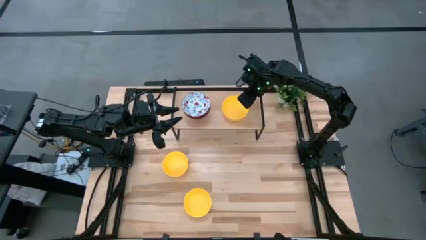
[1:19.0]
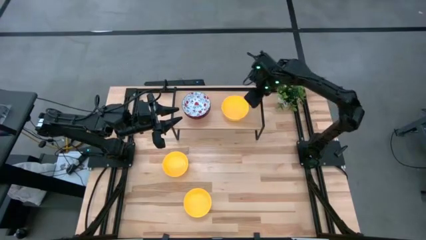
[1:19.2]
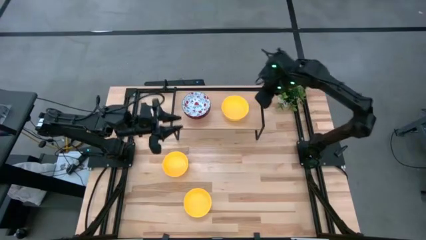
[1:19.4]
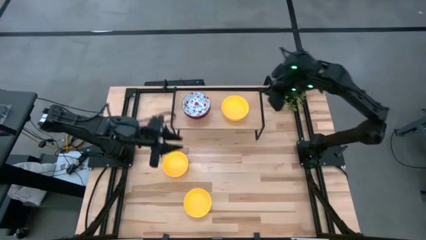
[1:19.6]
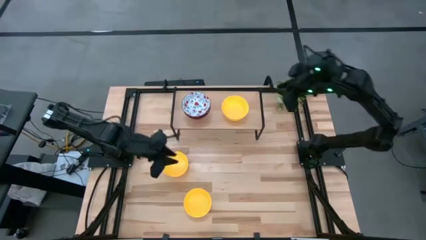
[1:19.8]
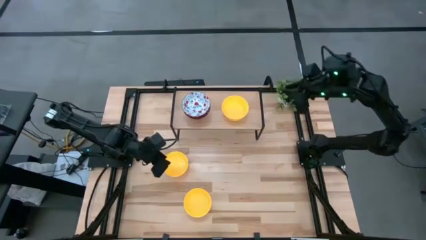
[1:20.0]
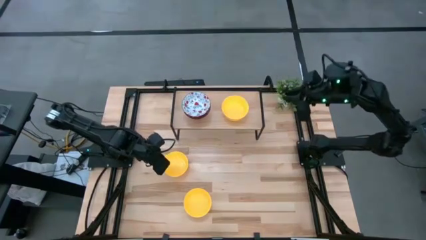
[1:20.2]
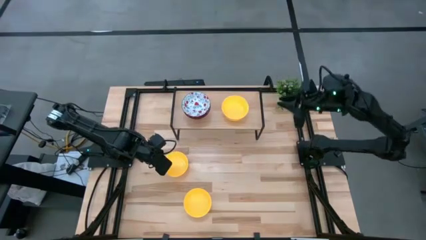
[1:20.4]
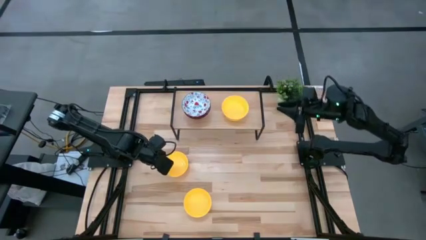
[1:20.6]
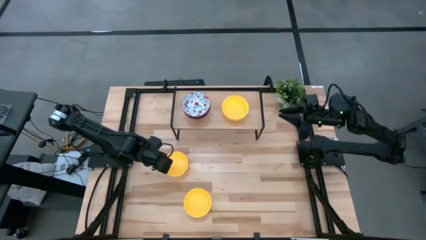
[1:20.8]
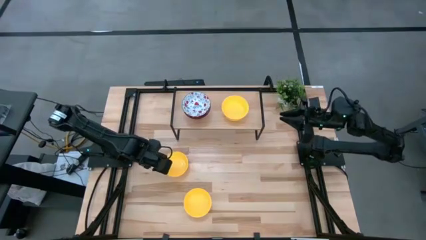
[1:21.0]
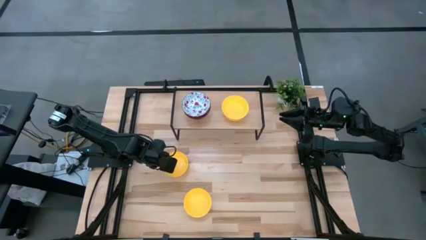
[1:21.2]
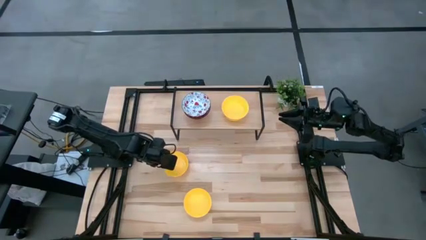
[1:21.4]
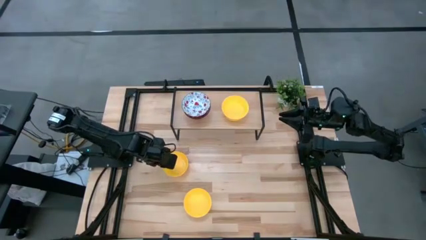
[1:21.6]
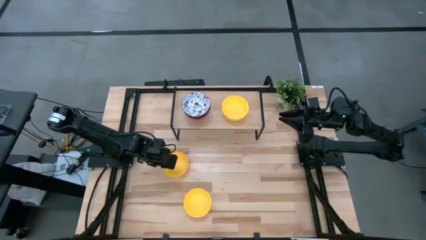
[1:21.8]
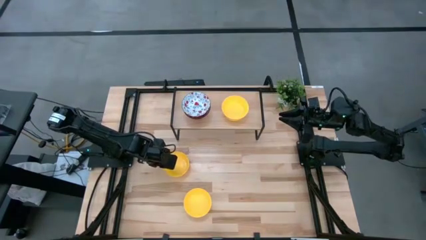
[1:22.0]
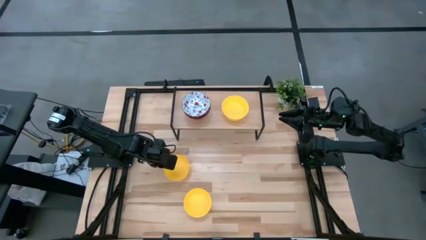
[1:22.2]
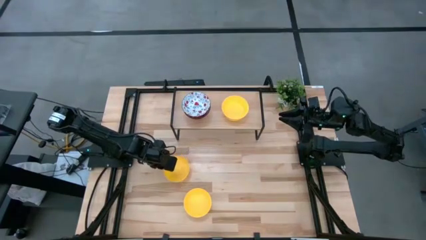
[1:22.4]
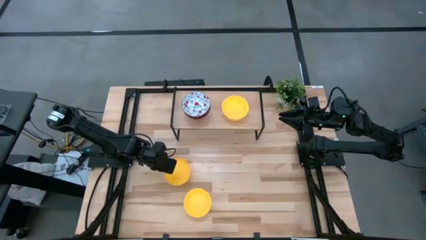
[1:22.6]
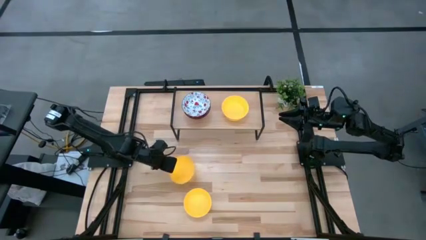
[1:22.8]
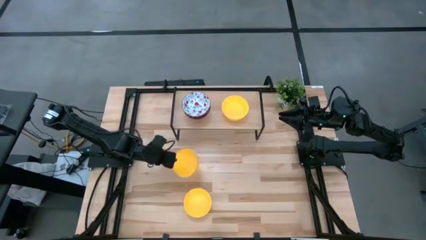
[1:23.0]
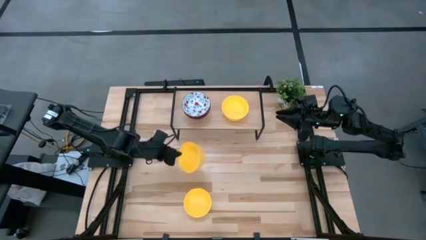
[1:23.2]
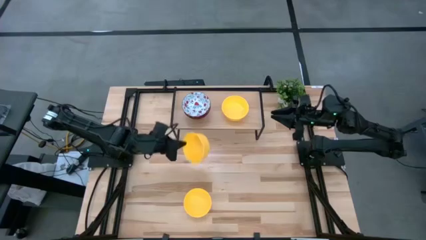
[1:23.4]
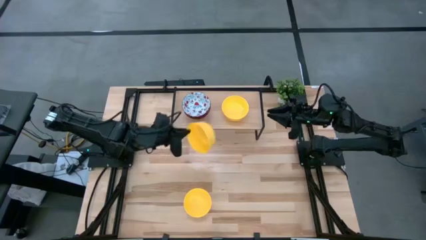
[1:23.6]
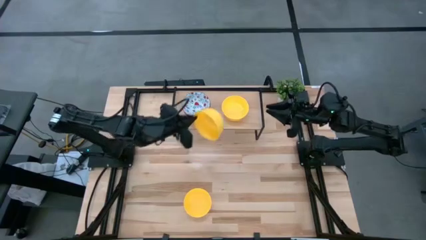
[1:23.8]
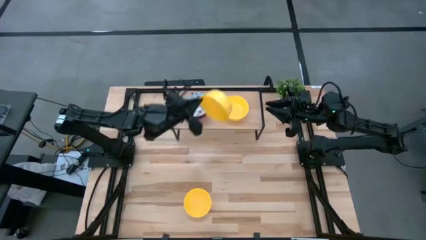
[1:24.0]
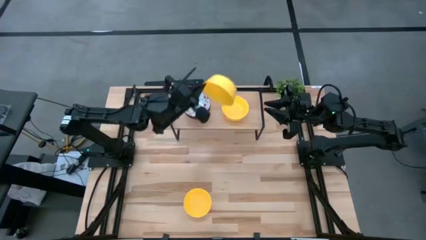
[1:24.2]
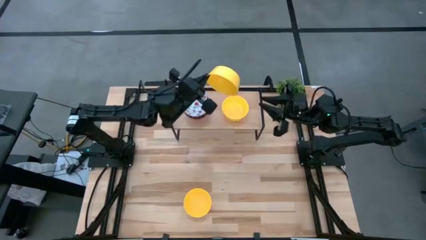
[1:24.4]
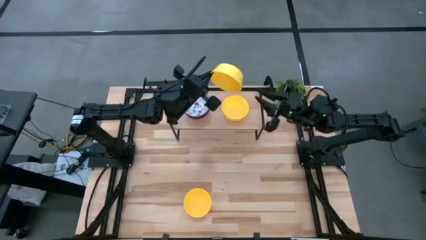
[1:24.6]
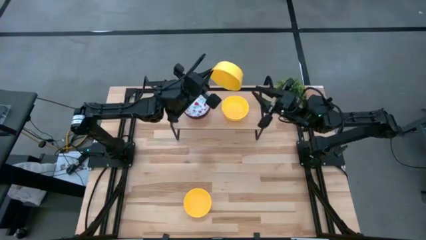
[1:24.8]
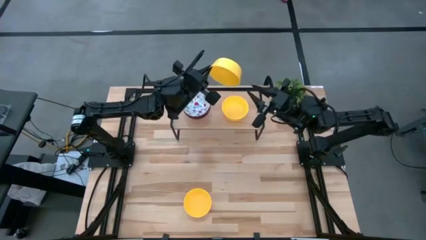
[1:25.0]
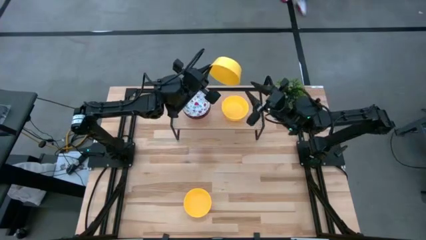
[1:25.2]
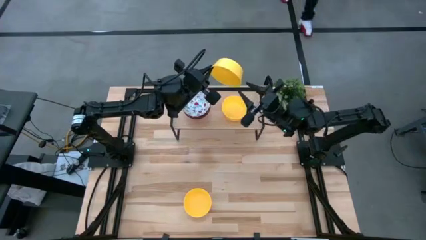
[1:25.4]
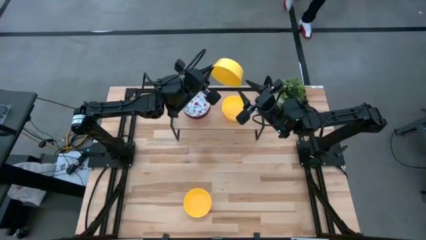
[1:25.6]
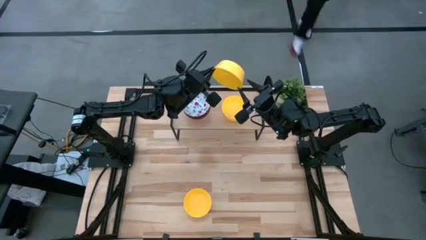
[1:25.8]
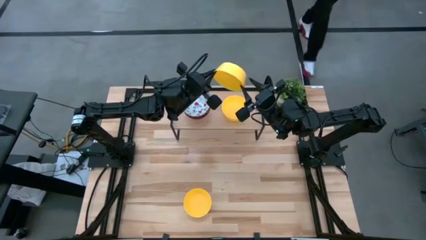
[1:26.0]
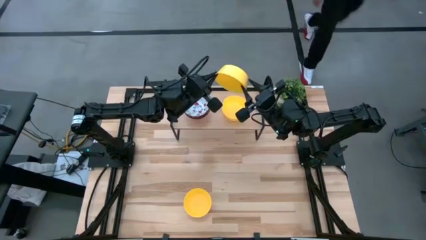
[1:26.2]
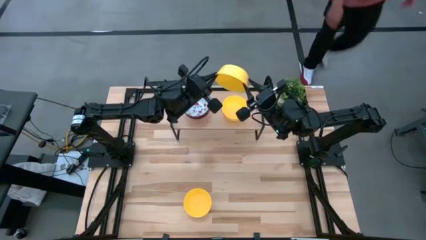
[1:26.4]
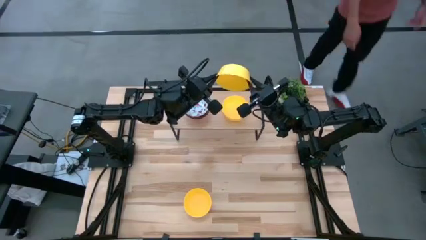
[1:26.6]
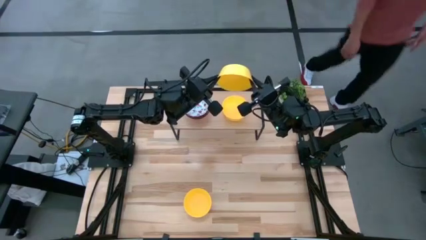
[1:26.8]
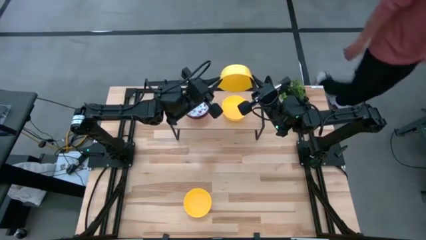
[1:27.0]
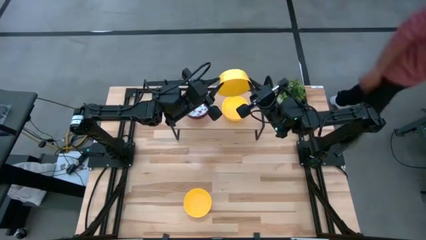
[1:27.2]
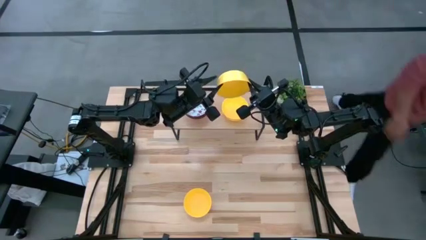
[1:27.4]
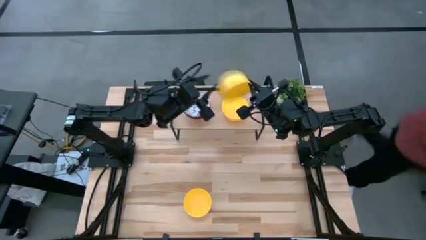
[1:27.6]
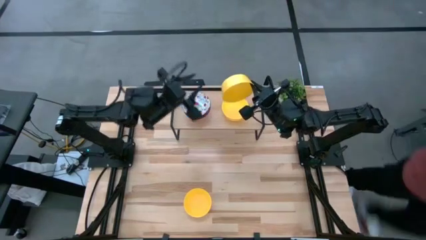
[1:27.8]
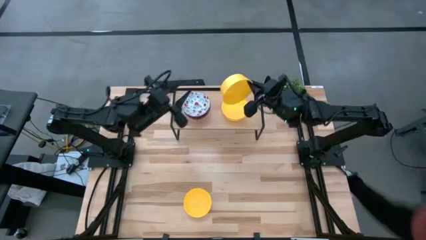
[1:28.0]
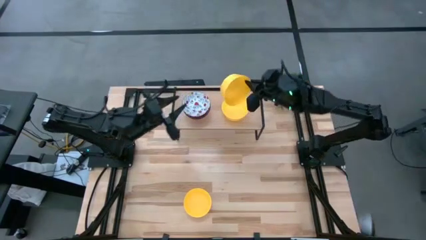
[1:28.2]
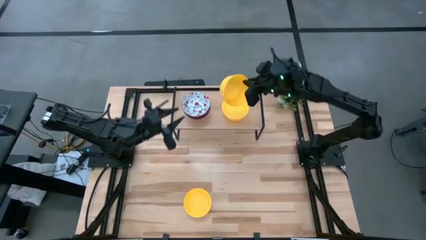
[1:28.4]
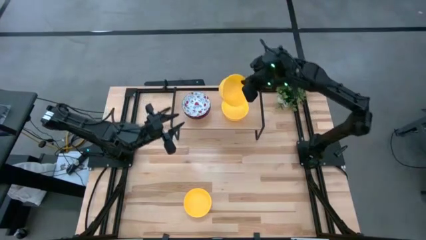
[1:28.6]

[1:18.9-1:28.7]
Task: Pick & Place Mini bowls
Stack the top yellow bowl on the yellow bowl on the shelf

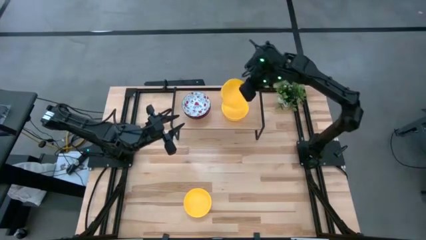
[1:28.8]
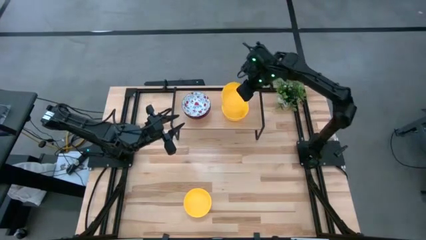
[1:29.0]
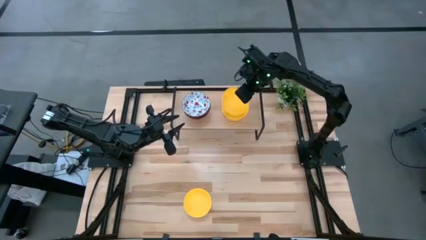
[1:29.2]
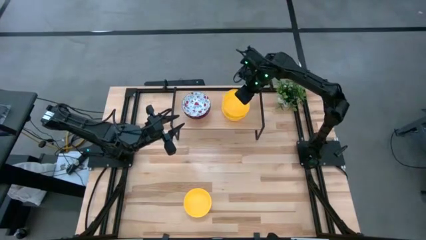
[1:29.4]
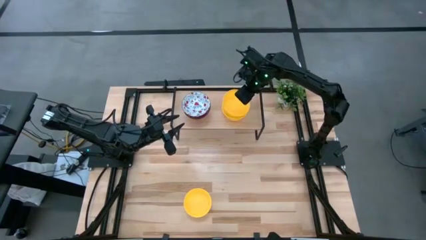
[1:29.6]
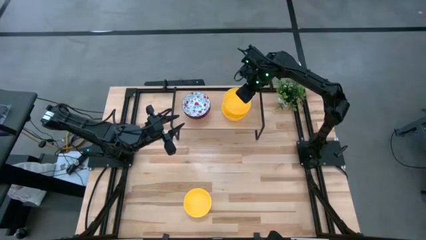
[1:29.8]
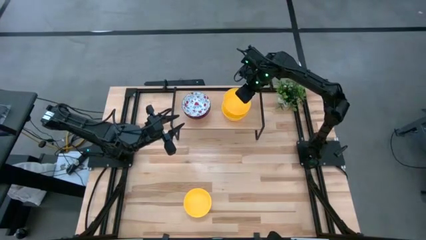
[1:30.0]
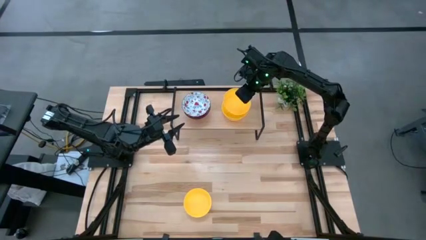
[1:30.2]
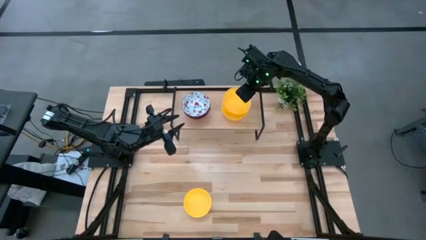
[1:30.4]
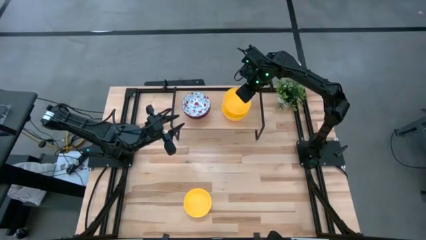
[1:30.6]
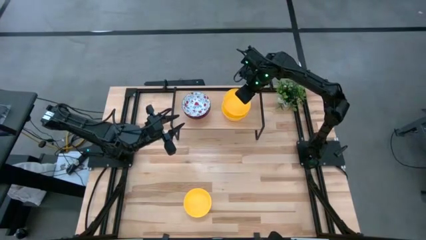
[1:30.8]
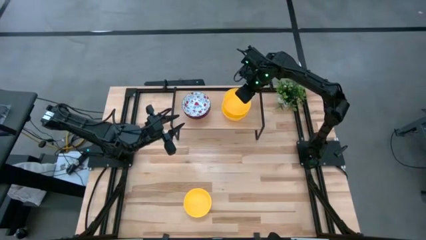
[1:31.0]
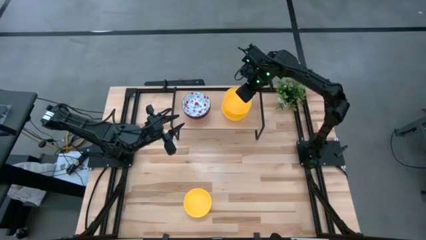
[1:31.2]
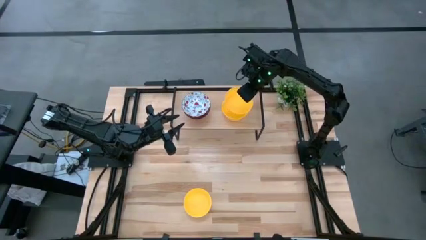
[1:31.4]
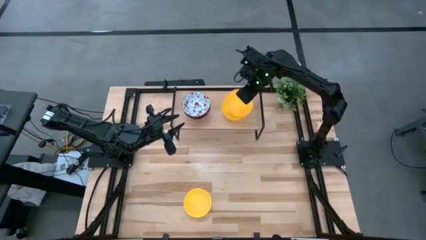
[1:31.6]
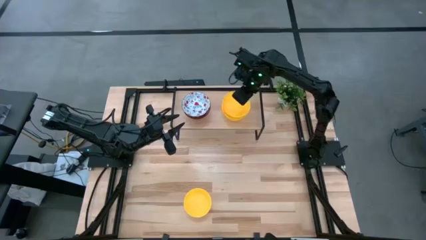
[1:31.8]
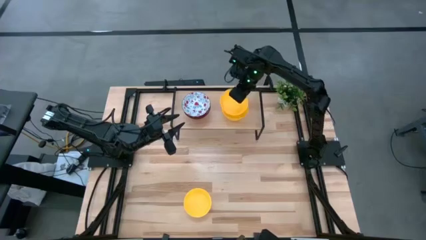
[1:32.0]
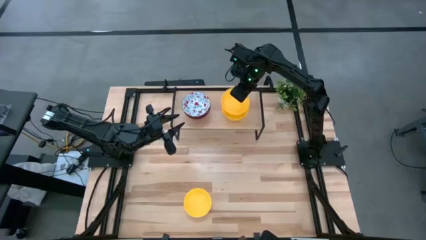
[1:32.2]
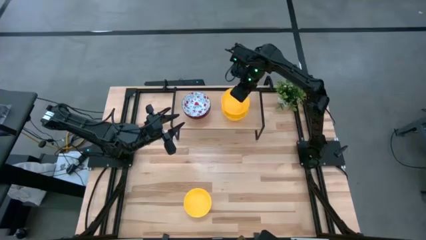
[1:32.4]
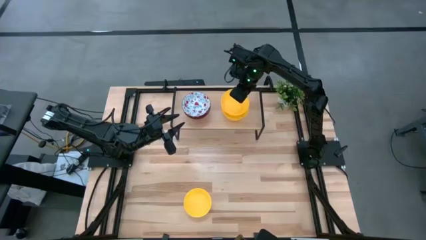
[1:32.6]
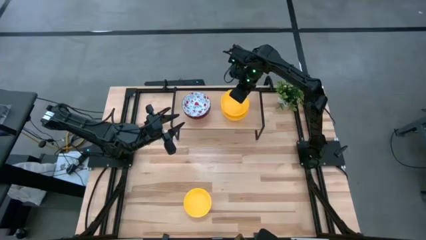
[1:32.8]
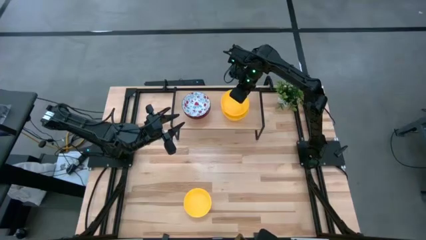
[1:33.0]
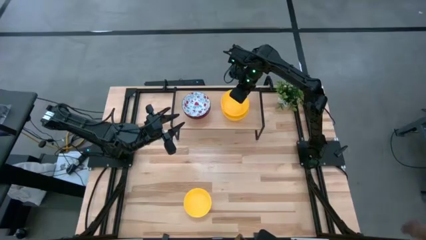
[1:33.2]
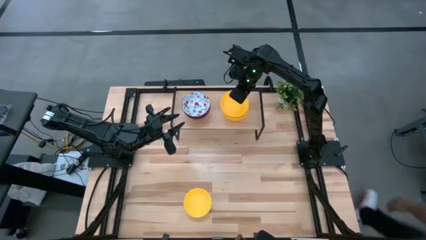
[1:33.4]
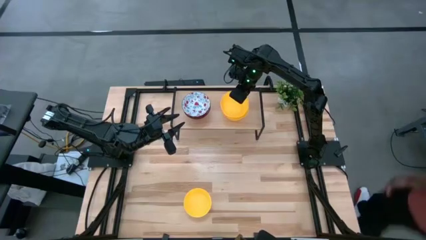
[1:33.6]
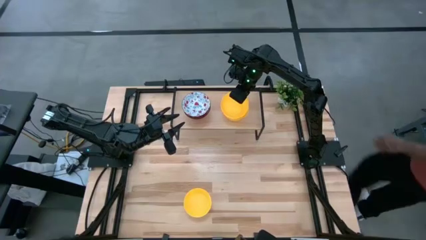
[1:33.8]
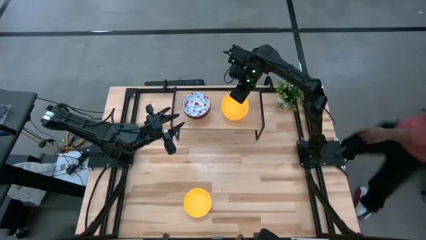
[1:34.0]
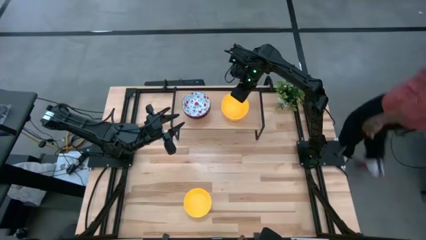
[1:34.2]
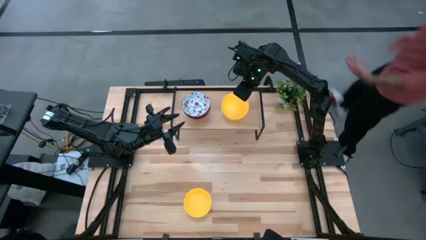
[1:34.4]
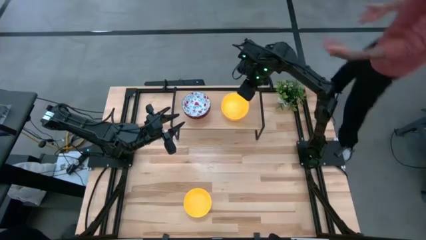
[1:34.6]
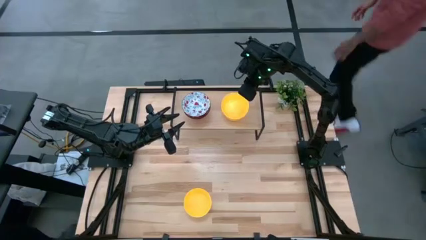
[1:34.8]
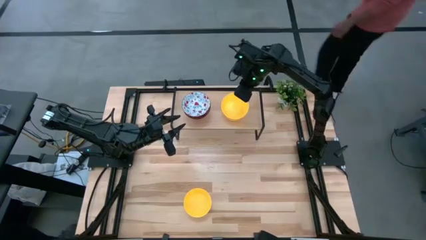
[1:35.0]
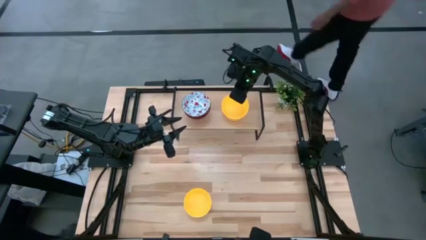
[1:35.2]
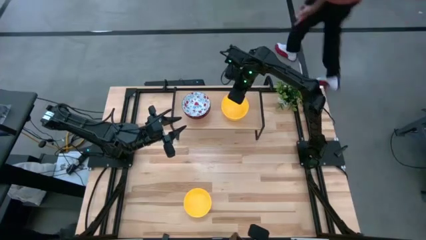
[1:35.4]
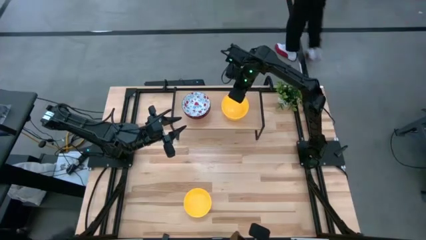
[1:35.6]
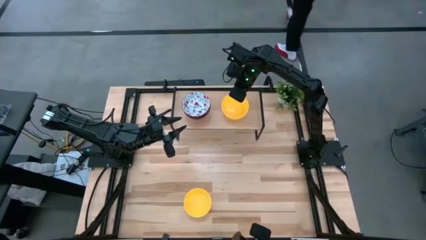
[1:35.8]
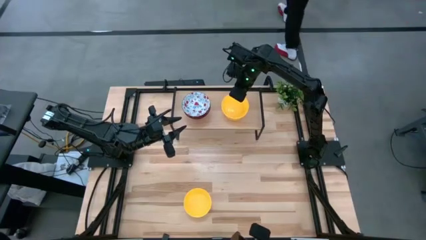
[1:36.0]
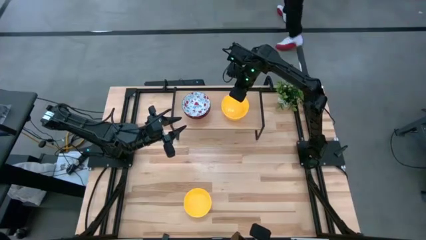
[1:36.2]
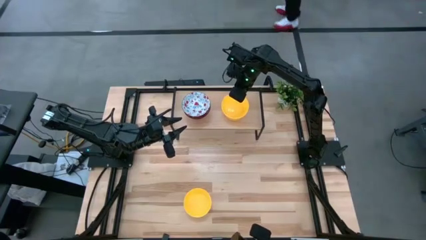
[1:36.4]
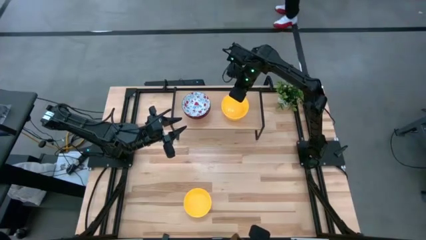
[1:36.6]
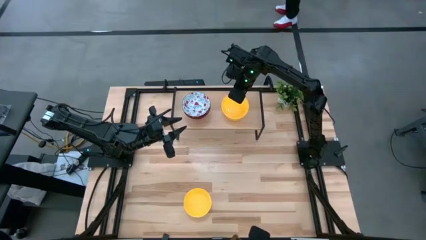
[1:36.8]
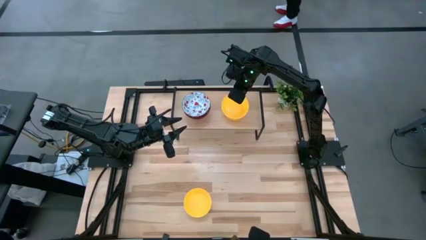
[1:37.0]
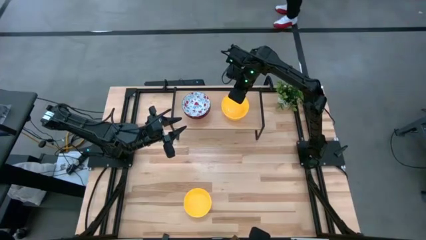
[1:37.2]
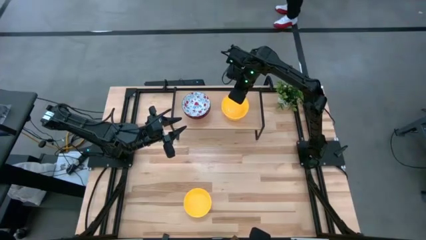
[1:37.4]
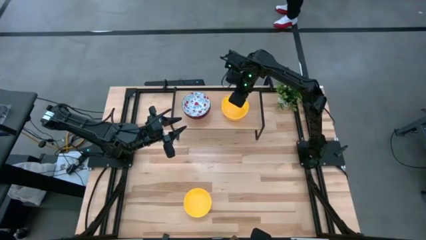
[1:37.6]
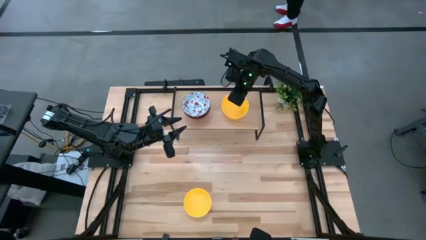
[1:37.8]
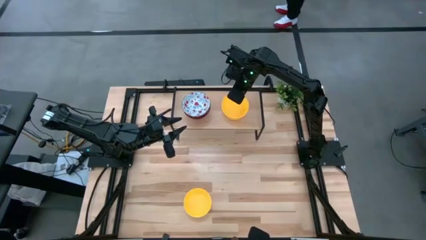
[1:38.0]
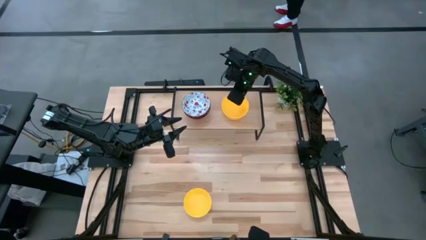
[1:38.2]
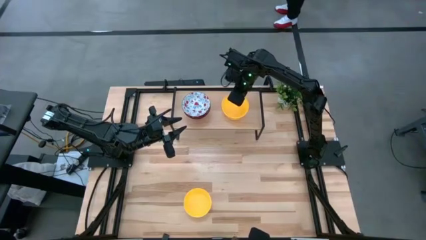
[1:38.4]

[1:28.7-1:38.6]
Stack the top yellow bowl on the yellow bowl on the shelf
